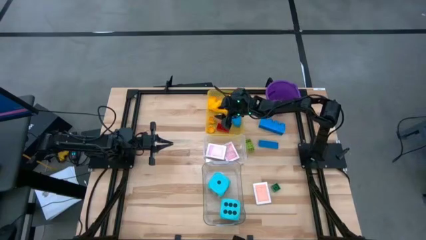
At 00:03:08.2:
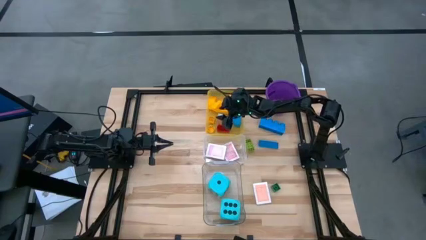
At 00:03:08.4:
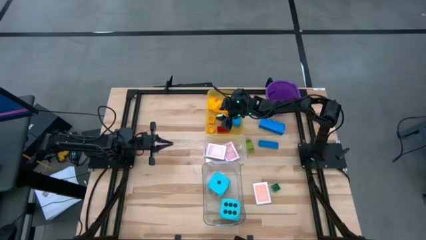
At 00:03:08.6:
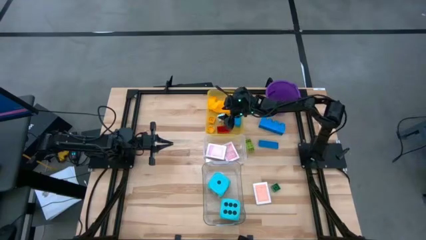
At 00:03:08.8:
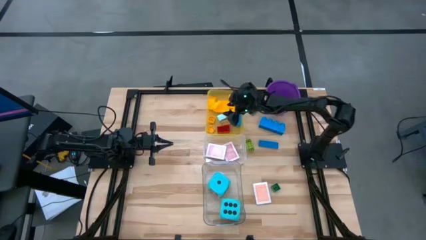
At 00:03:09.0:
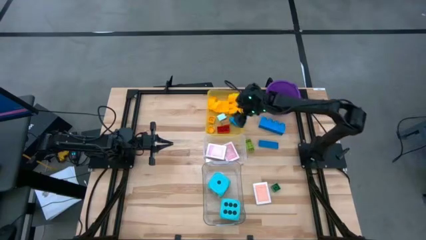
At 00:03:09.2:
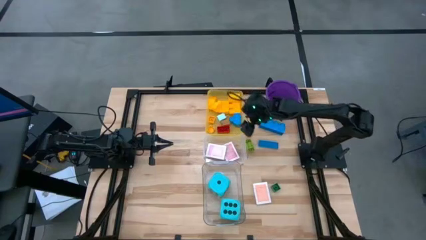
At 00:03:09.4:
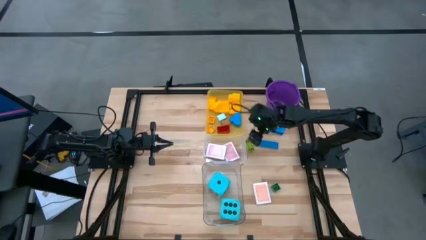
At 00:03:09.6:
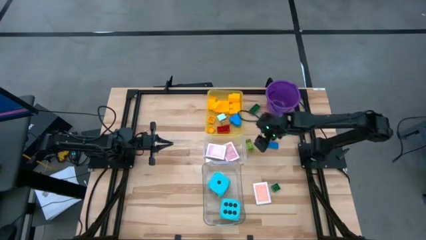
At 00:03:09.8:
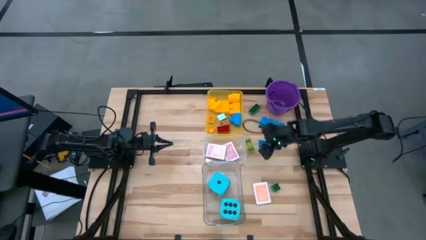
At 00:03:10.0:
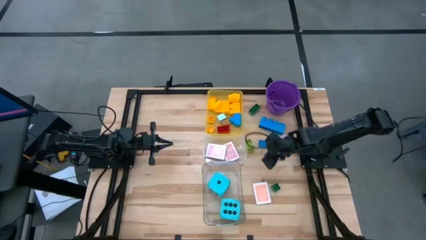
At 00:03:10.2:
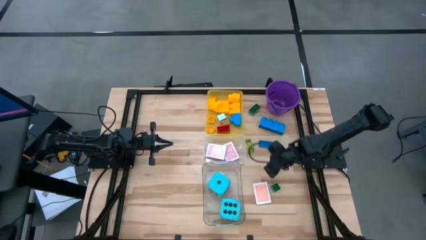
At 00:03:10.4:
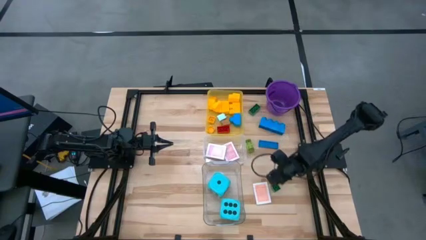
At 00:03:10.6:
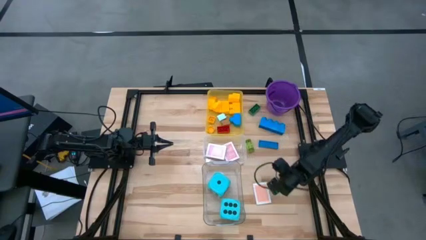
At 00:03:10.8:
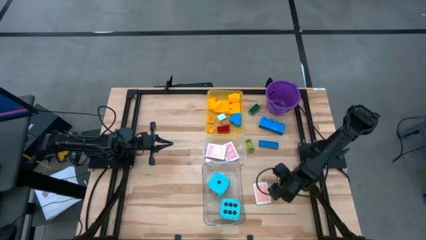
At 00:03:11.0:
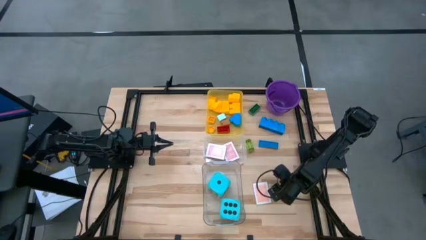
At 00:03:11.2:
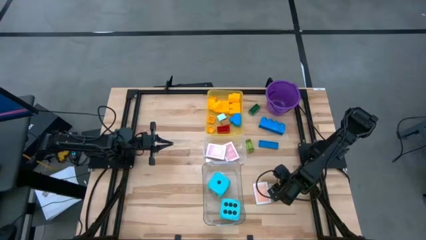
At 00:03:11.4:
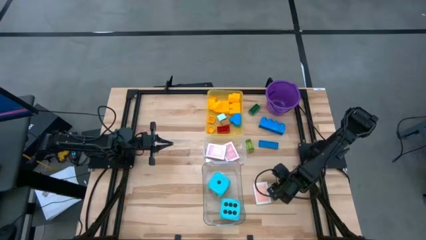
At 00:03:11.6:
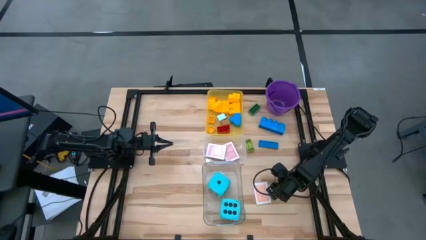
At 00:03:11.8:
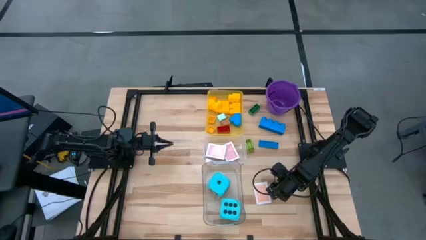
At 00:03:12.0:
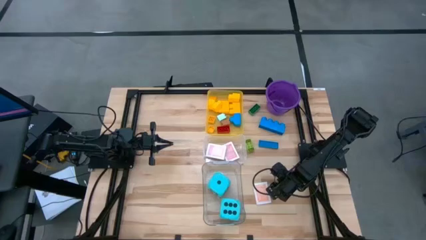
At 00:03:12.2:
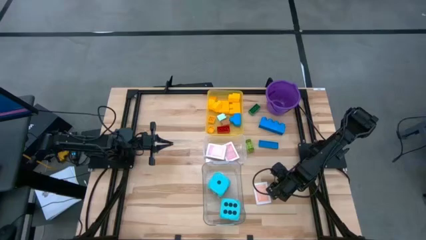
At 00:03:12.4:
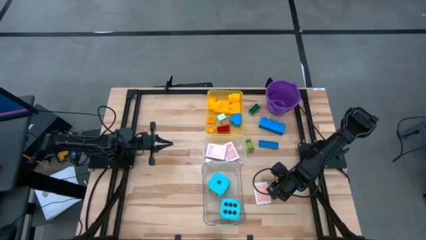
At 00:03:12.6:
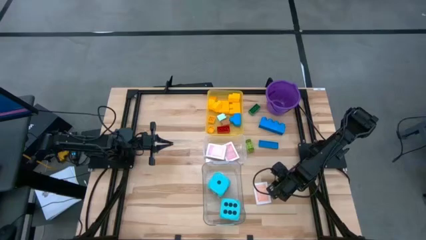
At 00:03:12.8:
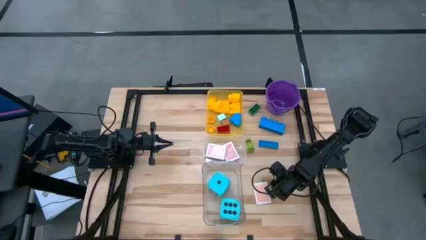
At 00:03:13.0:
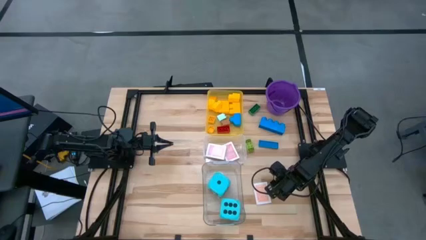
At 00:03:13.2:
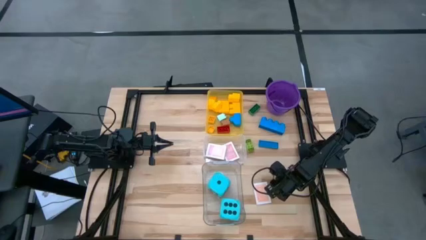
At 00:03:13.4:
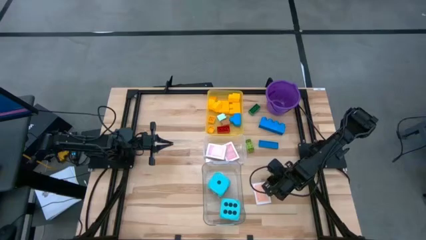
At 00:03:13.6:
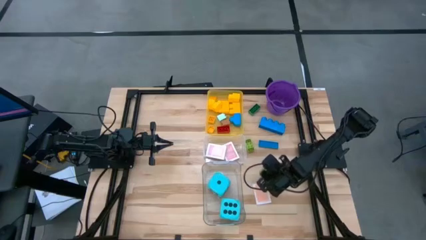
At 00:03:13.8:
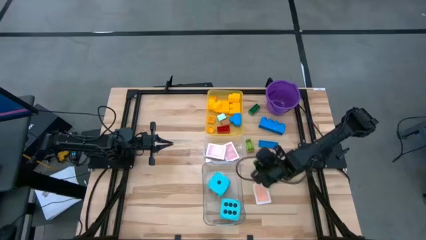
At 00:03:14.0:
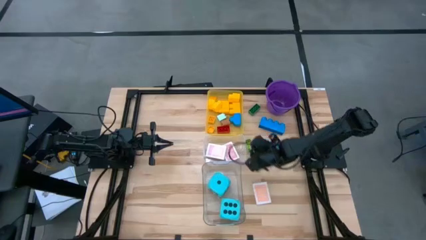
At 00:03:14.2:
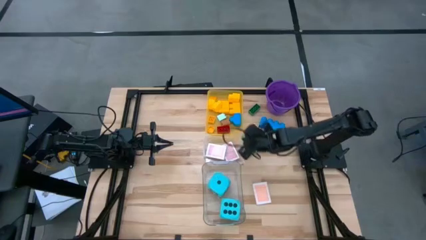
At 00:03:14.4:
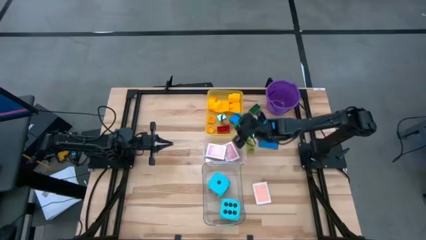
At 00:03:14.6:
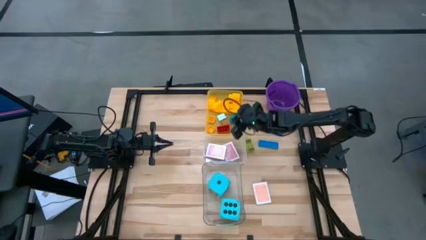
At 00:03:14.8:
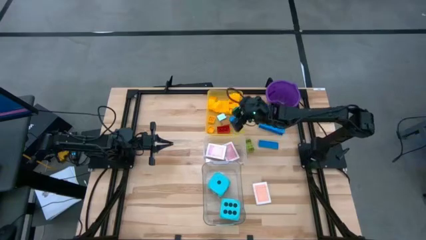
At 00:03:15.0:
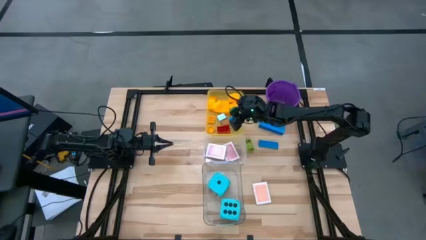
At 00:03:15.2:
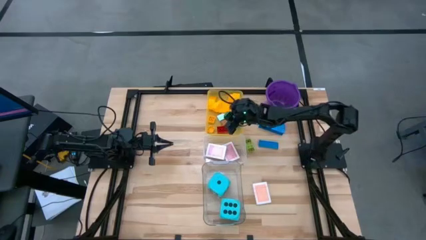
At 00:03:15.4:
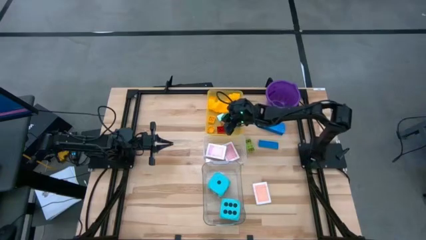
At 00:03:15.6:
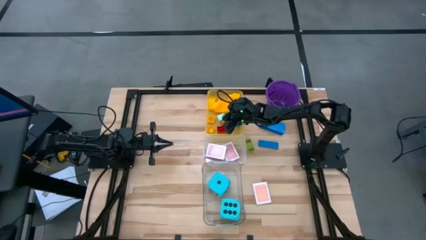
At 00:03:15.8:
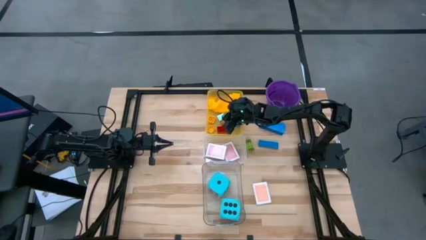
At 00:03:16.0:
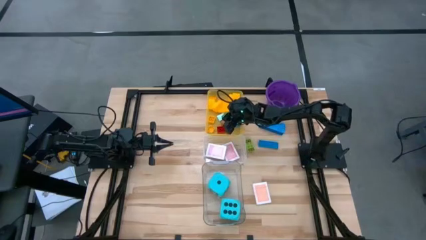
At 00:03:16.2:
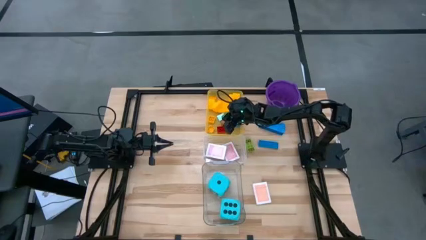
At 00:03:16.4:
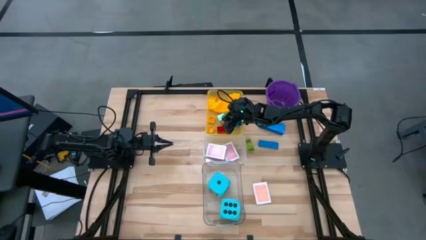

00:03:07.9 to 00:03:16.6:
Task: Pick & Place Toys
Put the green game piece into the yellow bin

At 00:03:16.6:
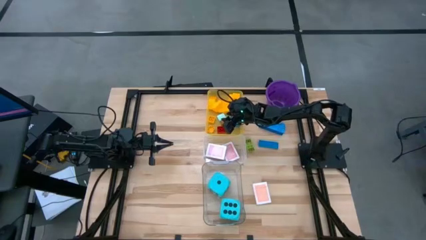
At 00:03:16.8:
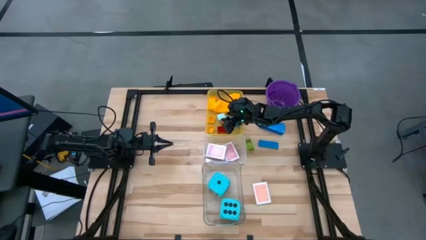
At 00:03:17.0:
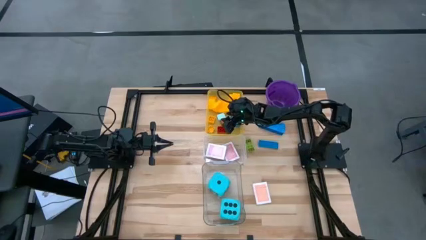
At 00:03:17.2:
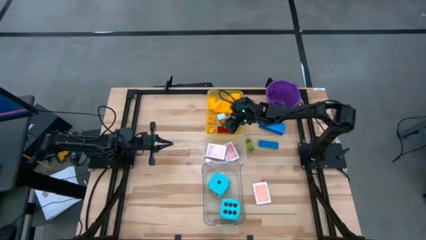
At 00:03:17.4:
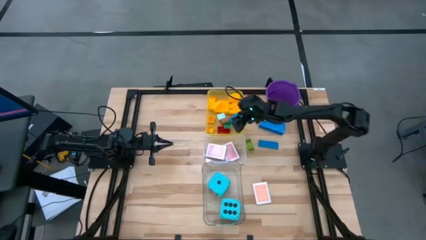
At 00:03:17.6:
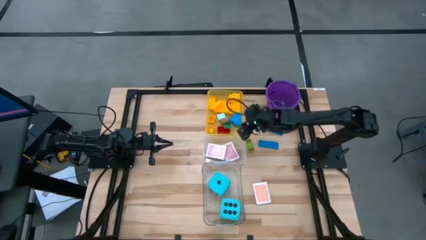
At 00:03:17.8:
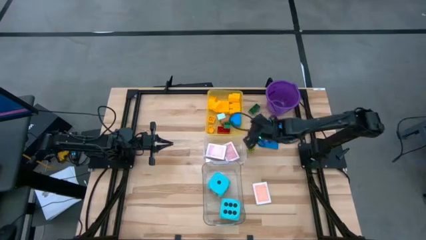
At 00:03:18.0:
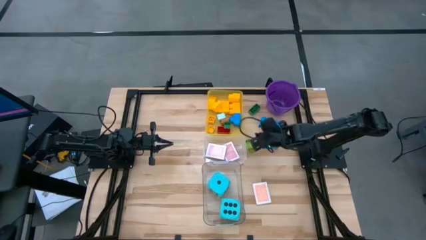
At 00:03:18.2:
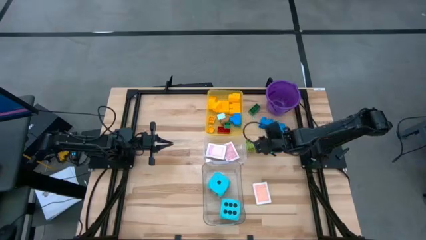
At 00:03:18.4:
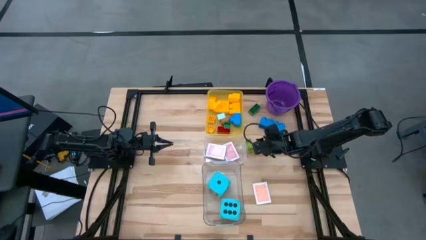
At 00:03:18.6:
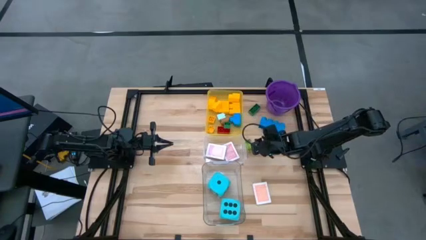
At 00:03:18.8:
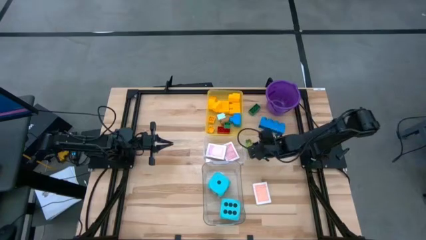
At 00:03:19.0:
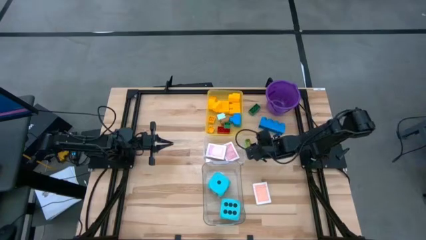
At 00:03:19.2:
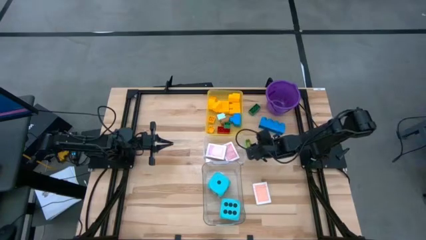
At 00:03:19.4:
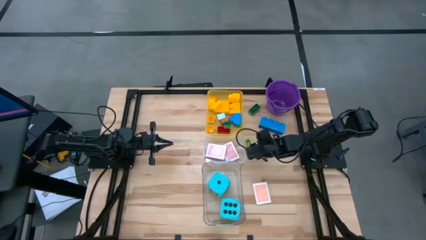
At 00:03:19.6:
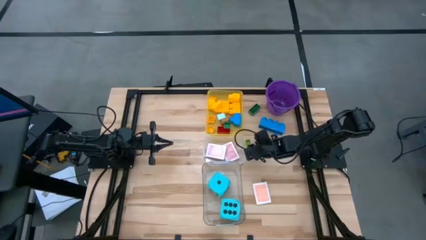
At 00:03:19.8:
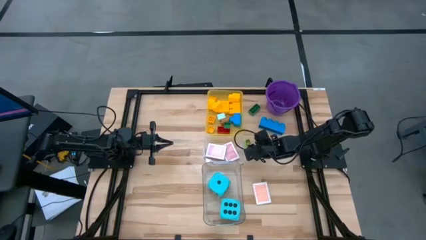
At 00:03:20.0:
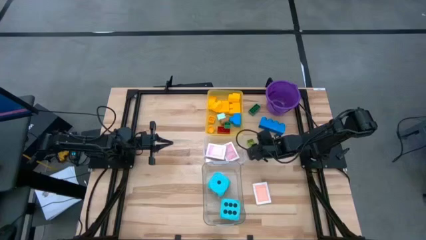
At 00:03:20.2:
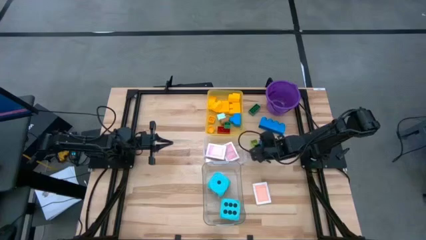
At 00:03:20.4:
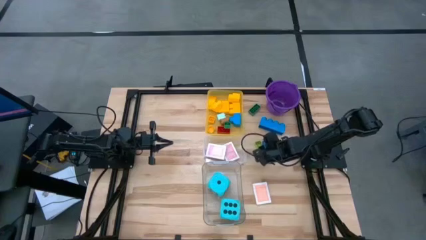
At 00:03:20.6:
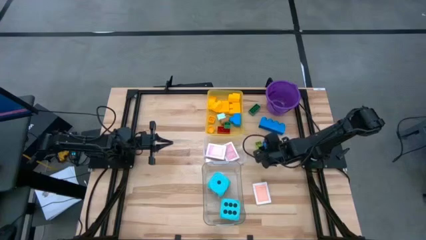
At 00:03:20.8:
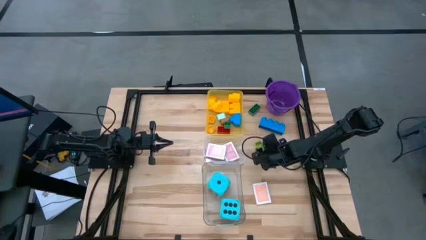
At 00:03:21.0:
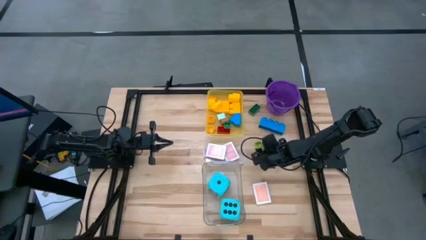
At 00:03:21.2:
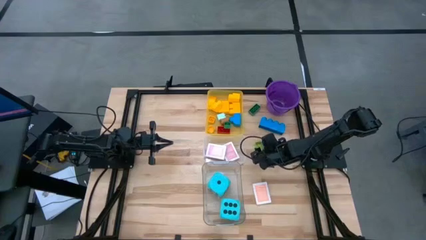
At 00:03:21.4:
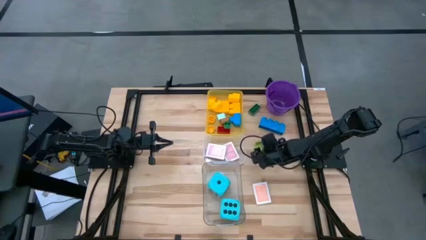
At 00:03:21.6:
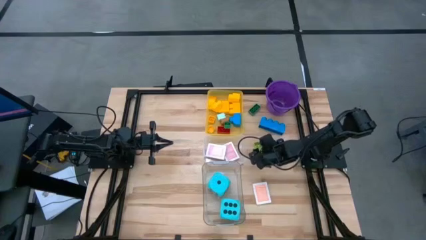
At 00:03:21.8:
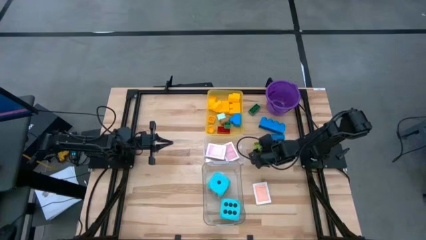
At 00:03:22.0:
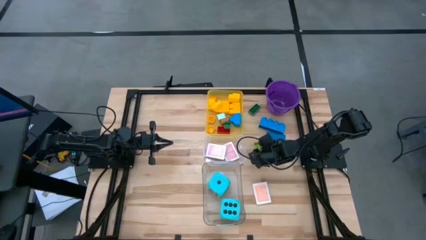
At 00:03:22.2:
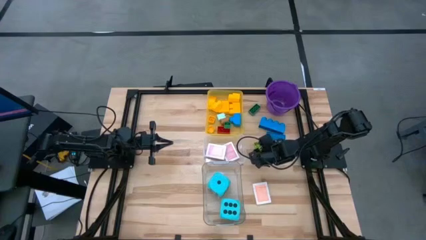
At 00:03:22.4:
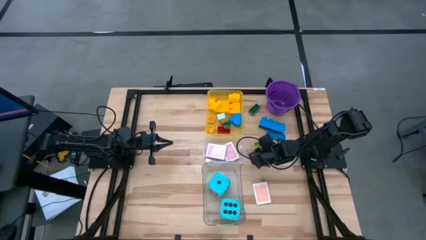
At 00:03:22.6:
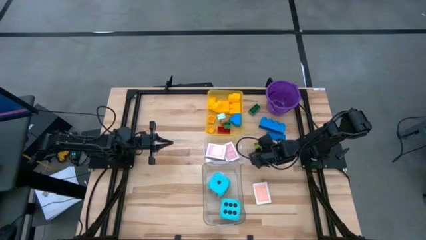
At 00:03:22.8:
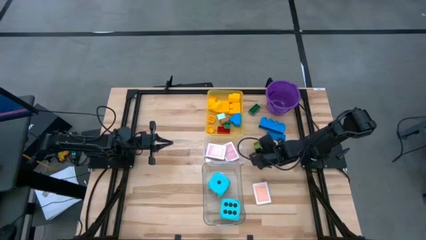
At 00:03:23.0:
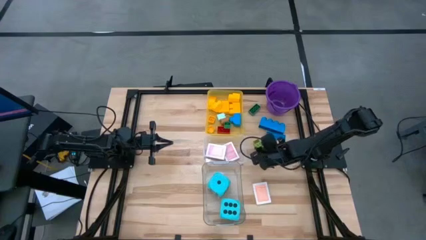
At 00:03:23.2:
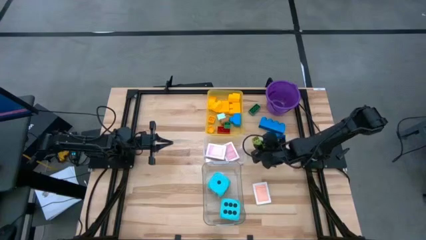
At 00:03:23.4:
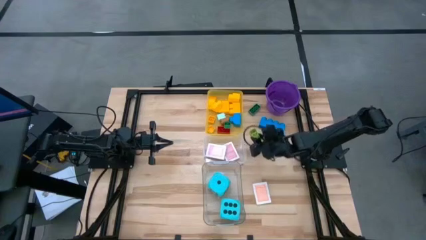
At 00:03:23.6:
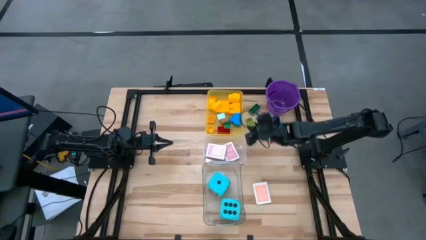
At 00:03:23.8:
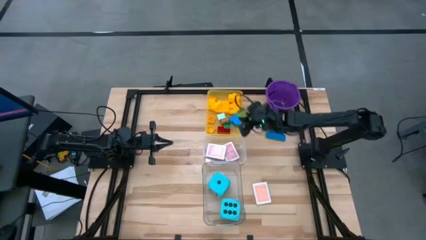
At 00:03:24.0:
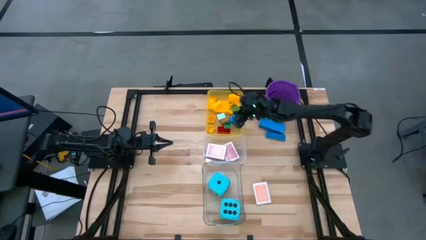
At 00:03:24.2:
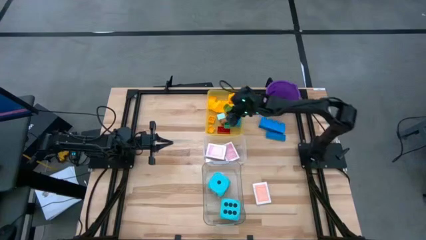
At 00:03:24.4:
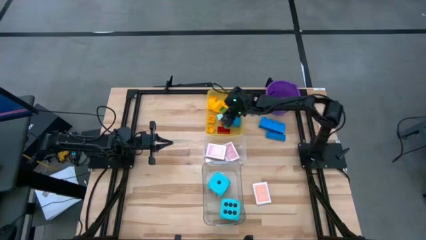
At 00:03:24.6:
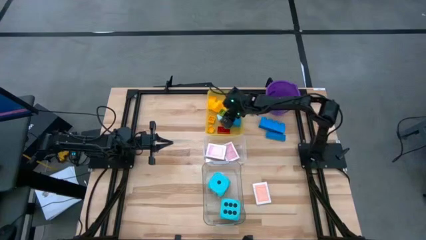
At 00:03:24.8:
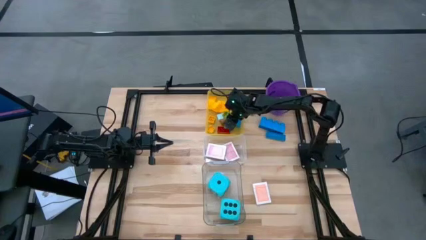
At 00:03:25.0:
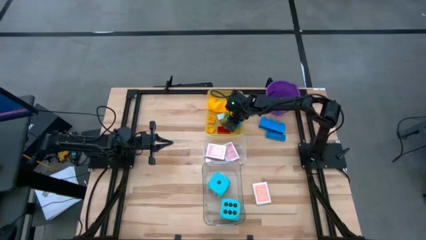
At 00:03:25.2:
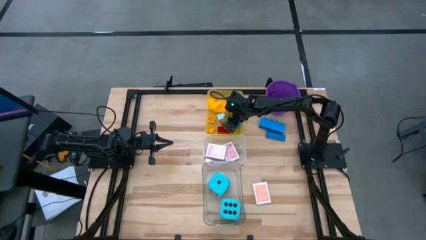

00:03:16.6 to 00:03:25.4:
Put the light green game piece into the yellow bin
